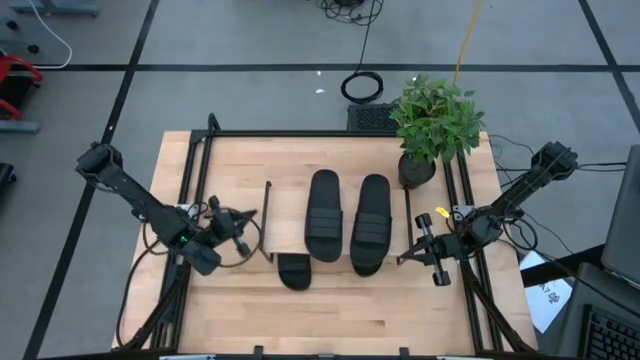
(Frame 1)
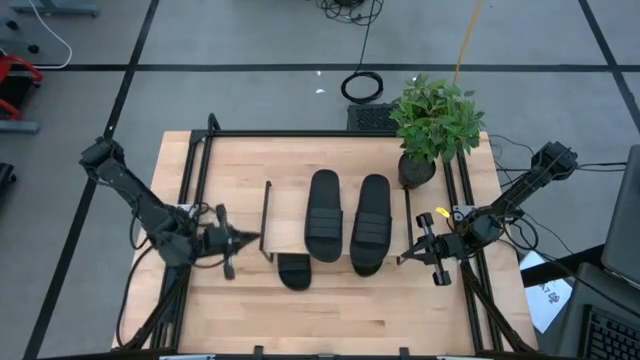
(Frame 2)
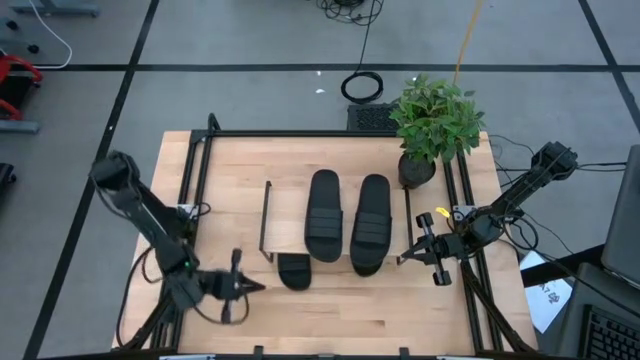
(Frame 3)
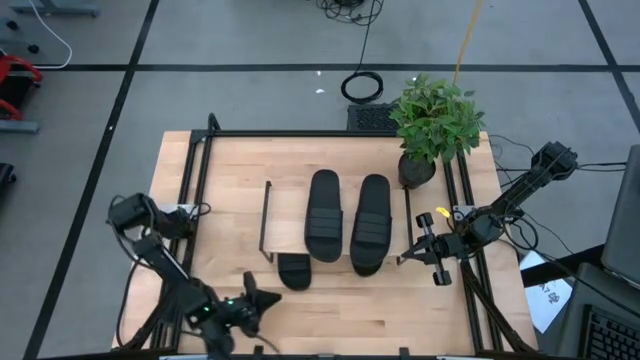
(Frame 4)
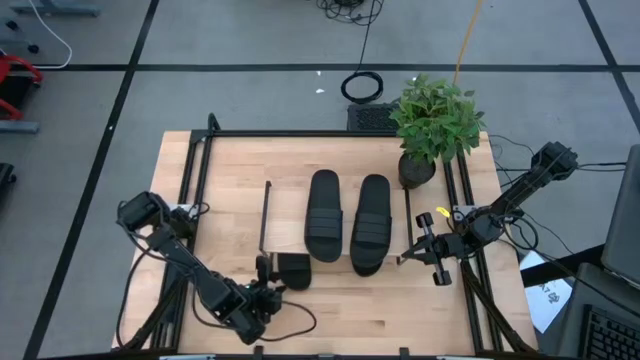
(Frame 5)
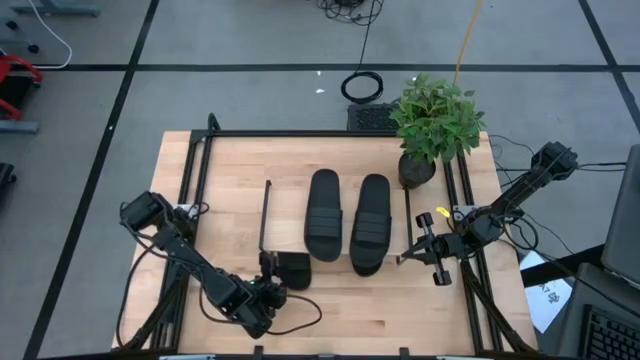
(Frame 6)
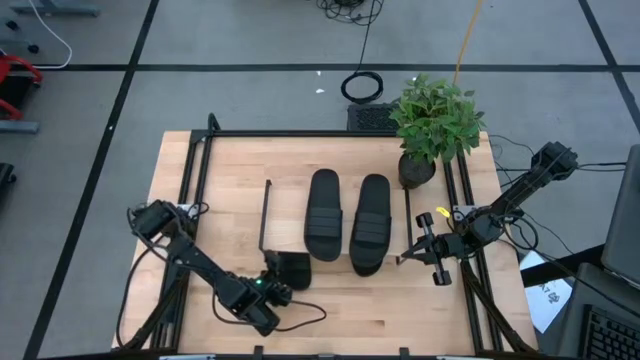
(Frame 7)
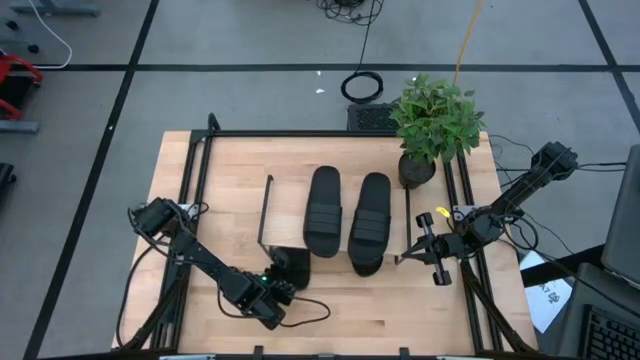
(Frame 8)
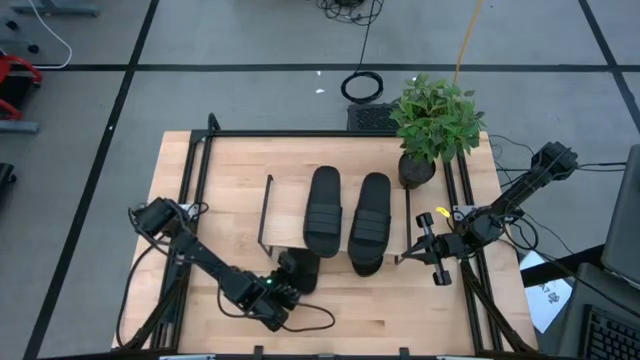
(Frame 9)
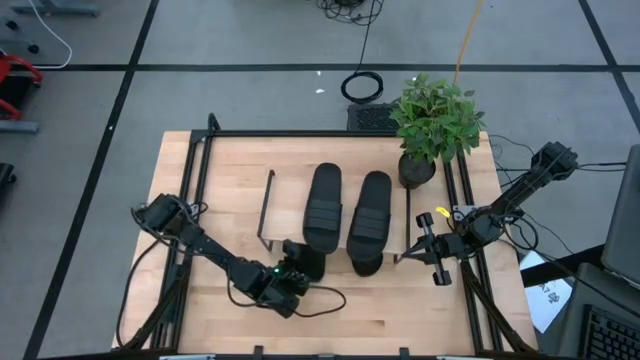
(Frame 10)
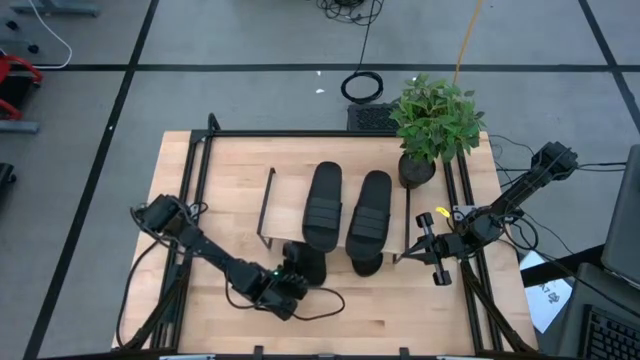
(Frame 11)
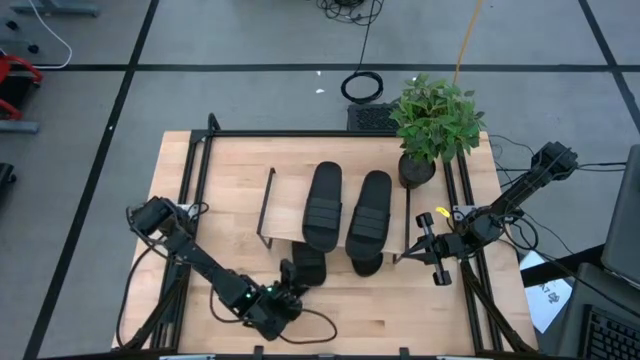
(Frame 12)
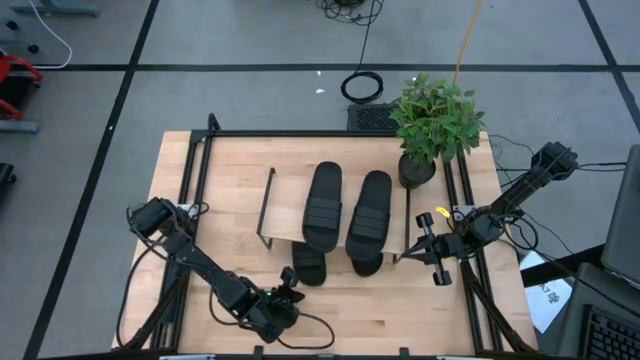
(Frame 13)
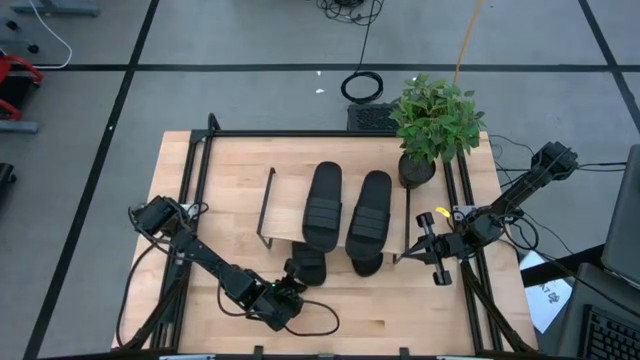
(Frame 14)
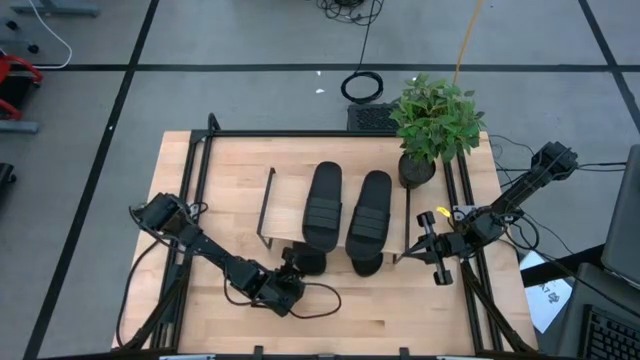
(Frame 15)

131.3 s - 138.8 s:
Task: Pick and place slides into the shelf
Adjust the left black slide under the shelf

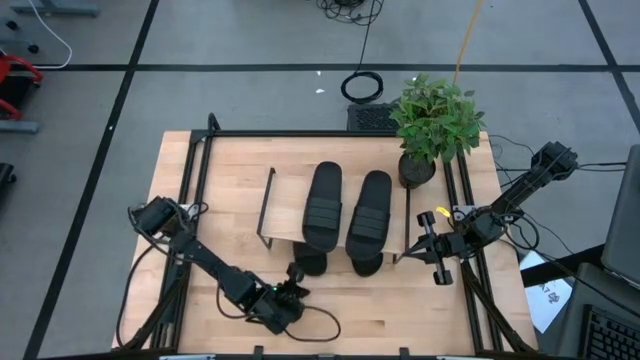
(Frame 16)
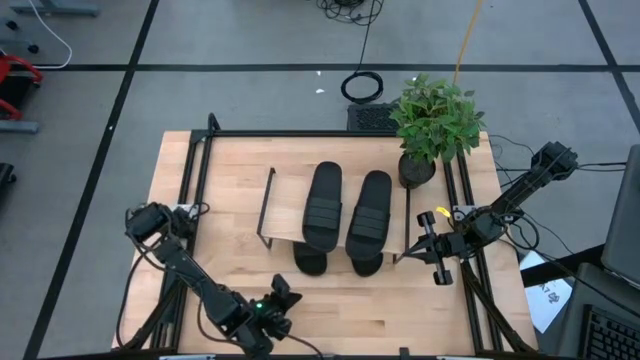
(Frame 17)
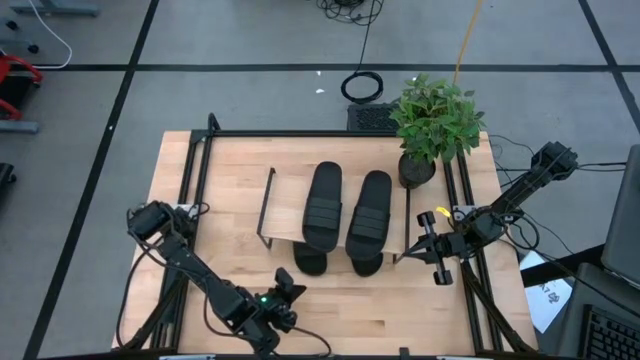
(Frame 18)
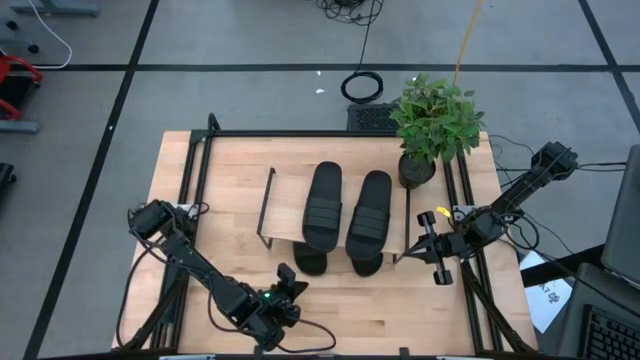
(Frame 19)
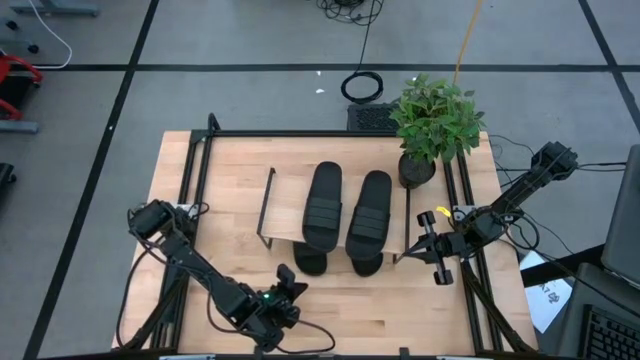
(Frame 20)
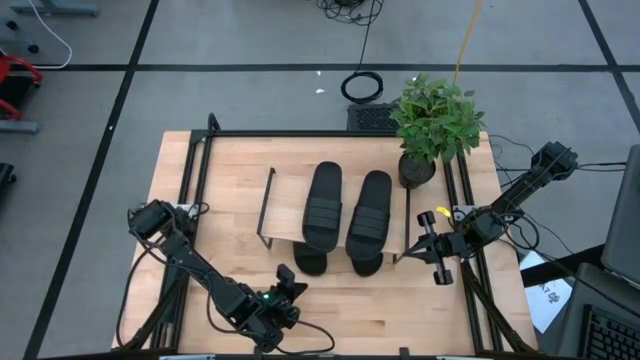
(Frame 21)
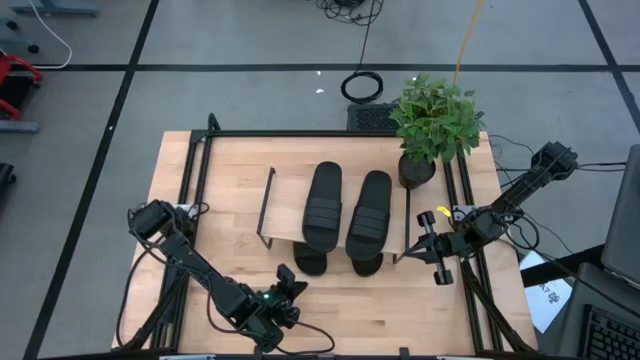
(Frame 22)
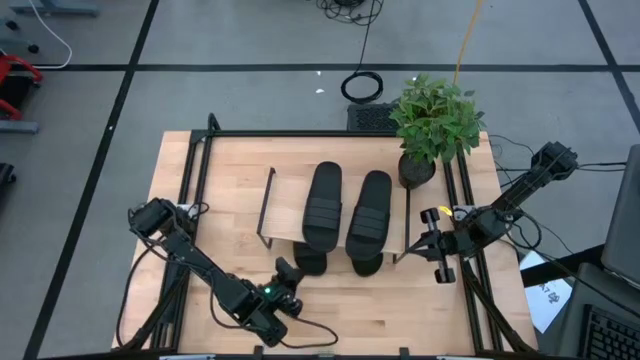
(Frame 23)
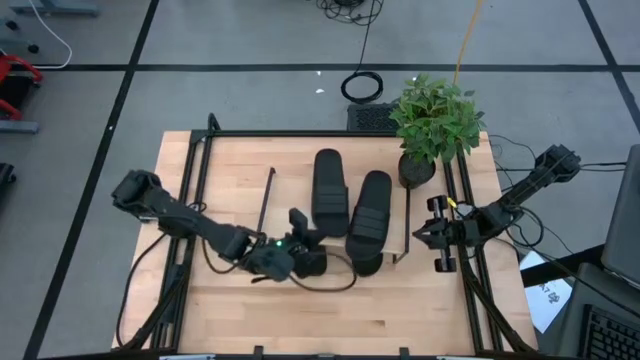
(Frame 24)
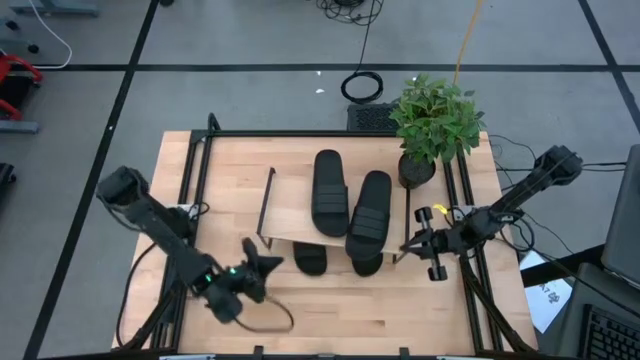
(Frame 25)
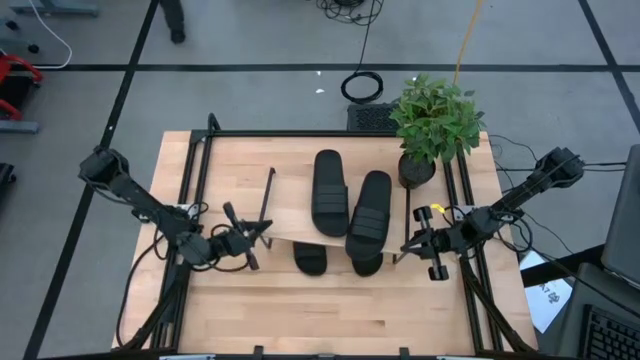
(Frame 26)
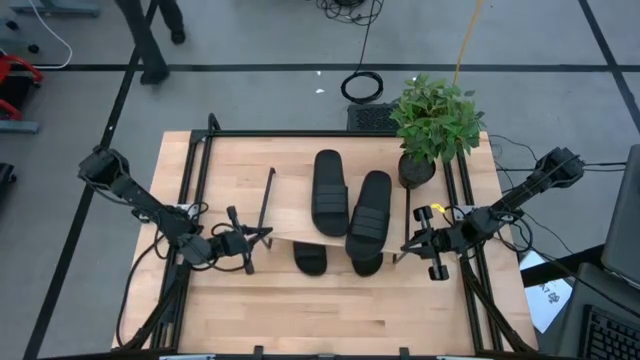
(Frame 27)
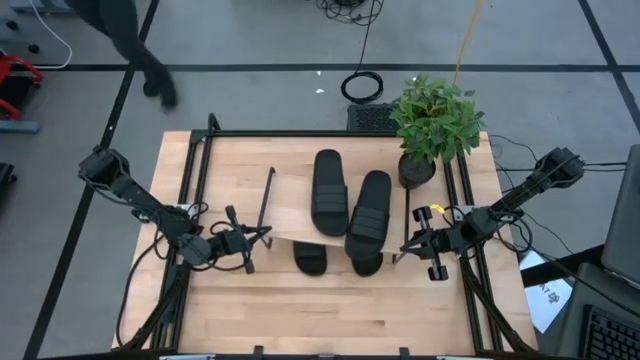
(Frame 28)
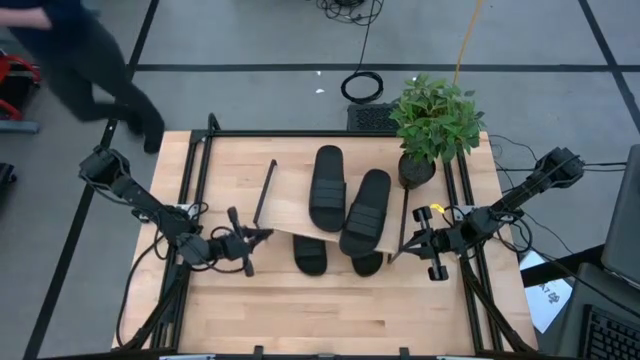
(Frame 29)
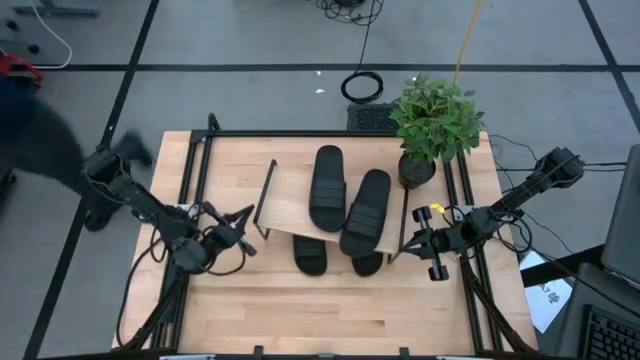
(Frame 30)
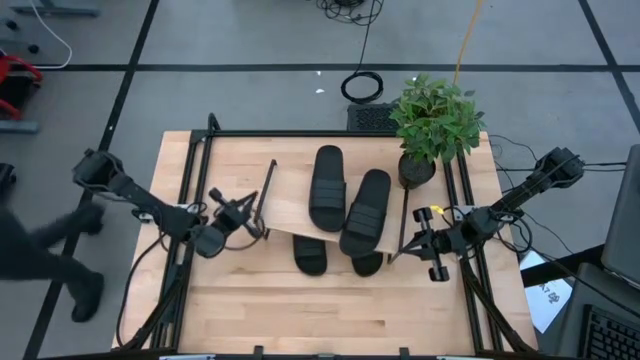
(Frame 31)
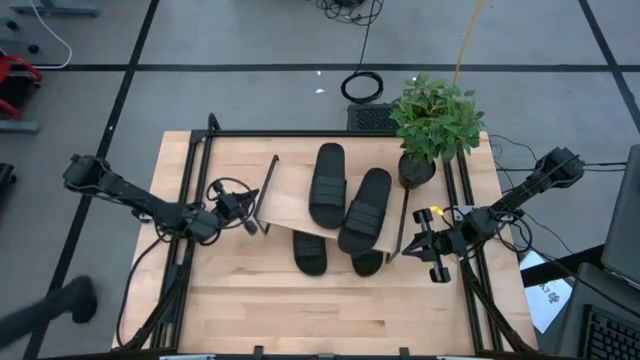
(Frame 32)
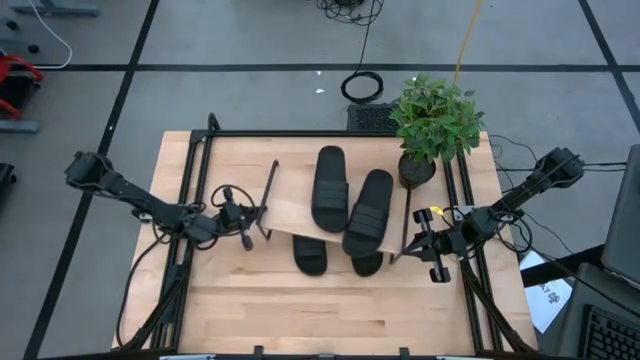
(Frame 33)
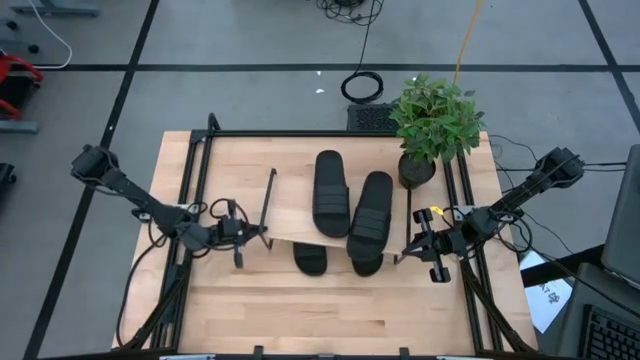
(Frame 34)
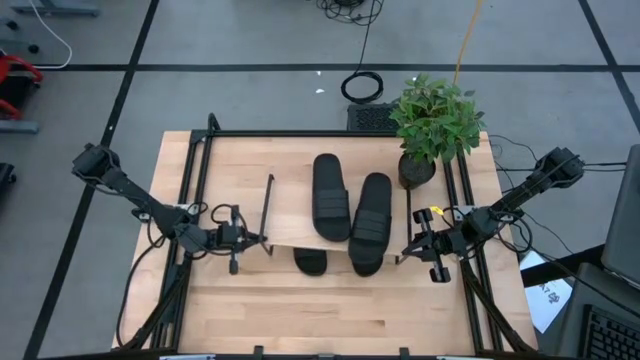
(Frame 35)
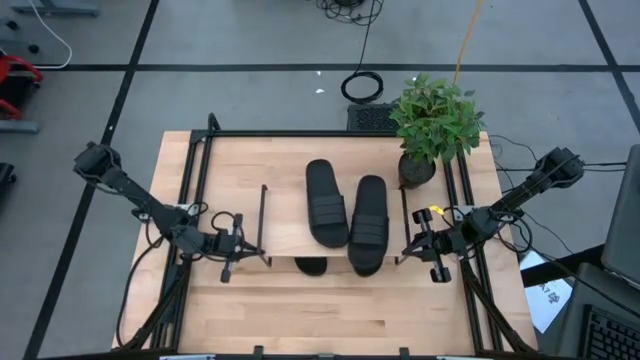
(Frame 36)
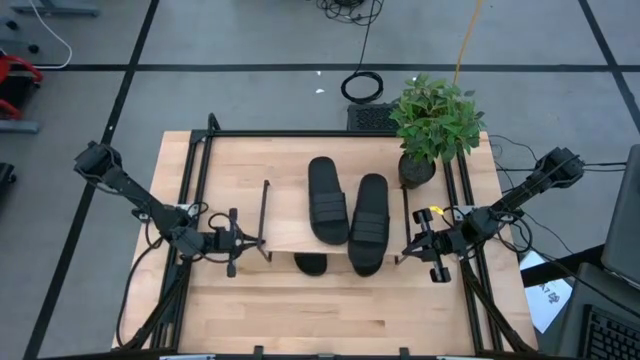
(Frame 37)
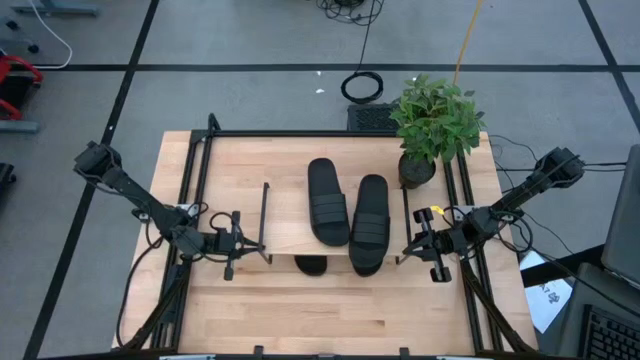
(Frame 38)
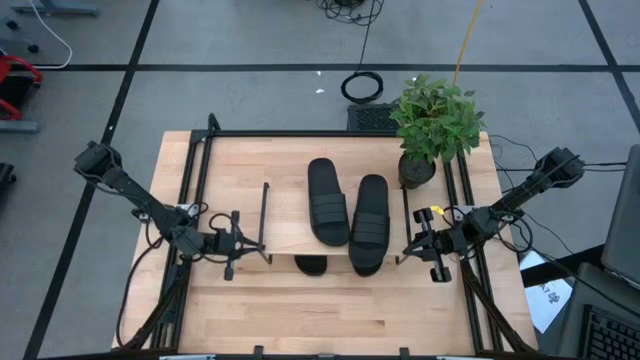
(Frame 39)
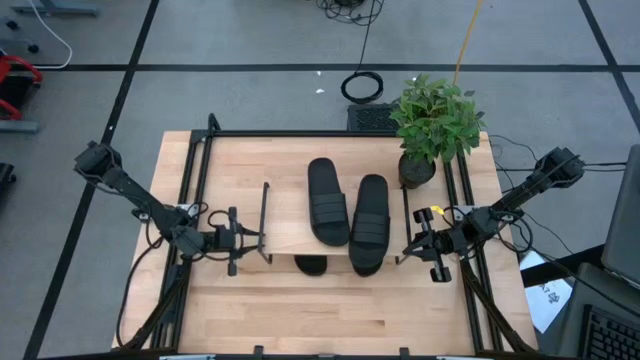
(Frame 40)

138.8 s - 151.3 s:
Adjust the shelf
